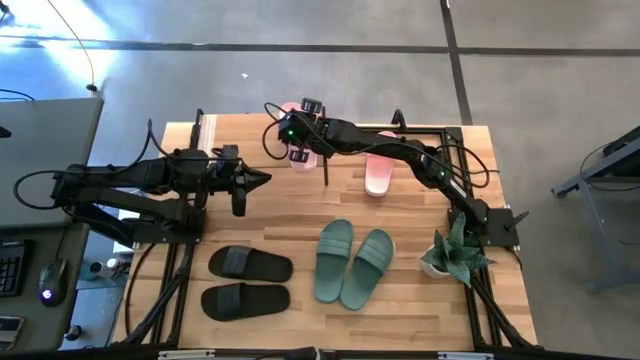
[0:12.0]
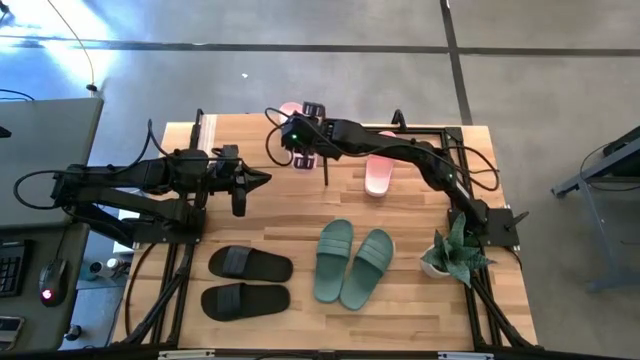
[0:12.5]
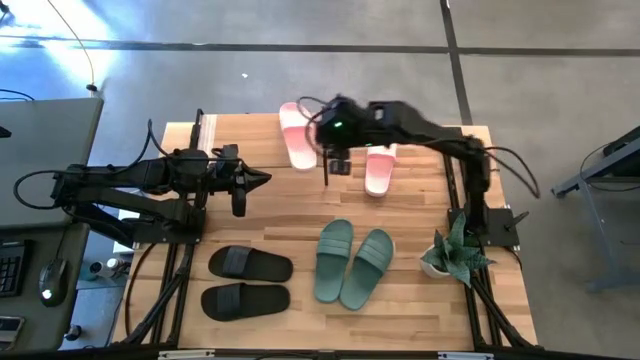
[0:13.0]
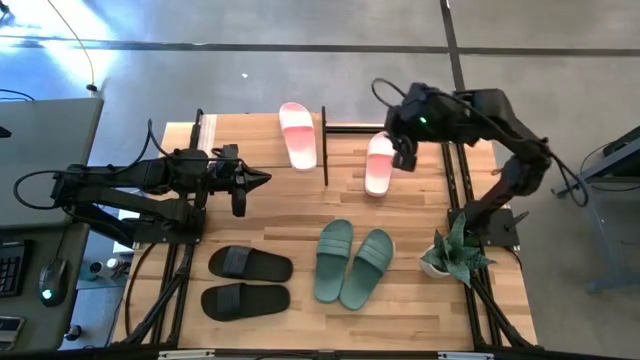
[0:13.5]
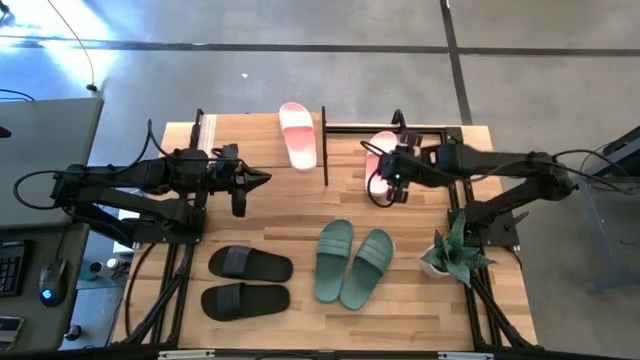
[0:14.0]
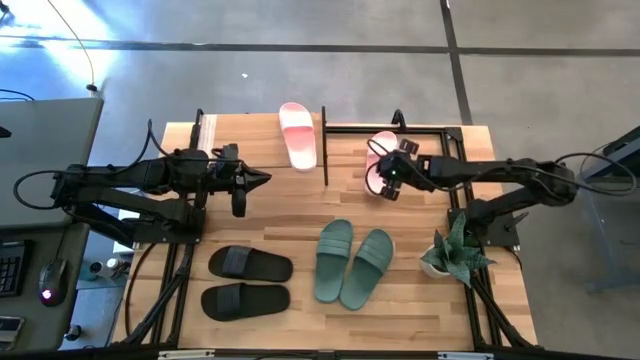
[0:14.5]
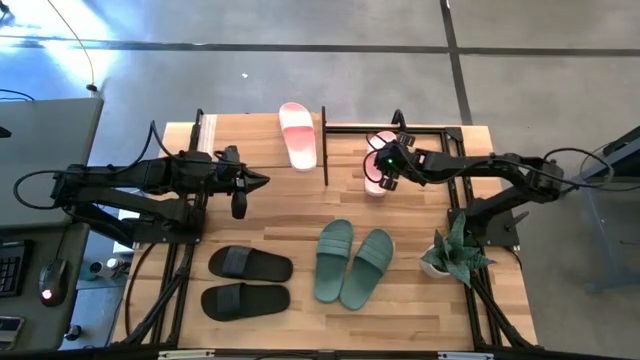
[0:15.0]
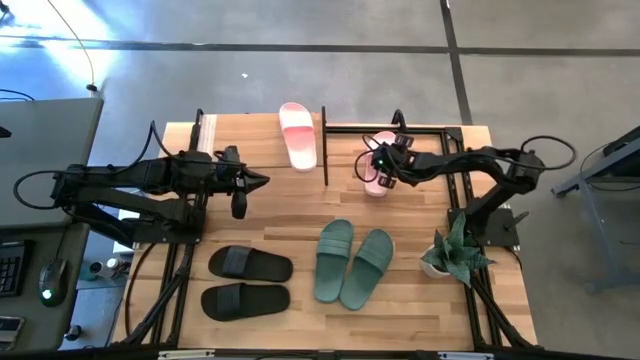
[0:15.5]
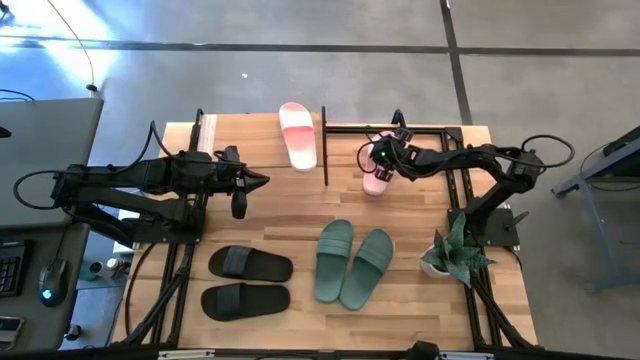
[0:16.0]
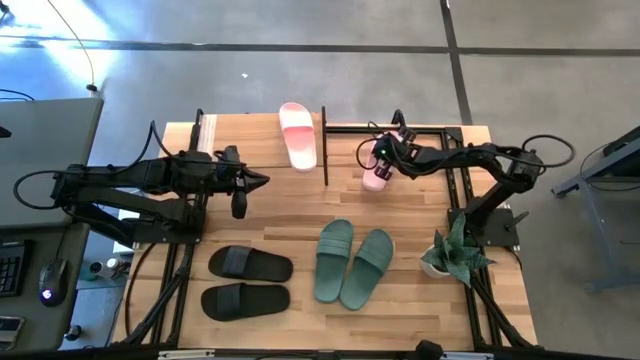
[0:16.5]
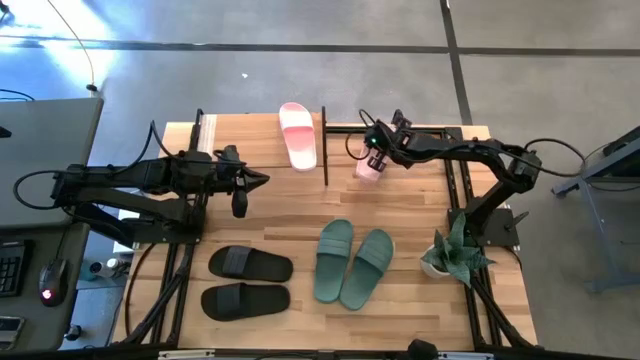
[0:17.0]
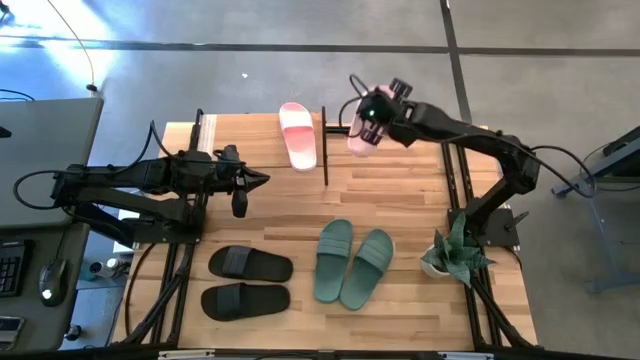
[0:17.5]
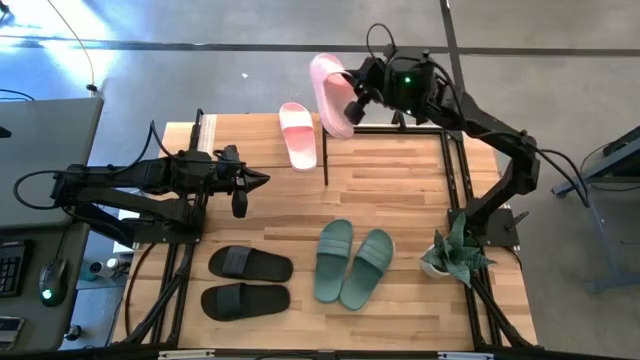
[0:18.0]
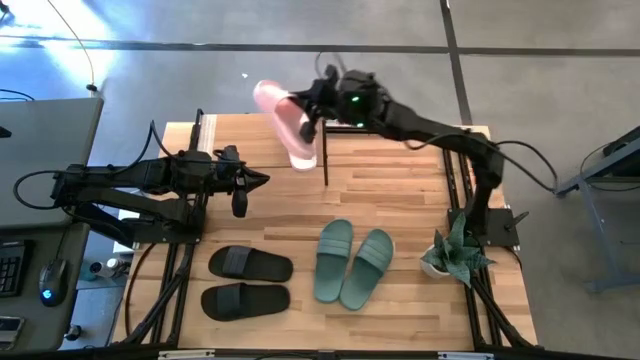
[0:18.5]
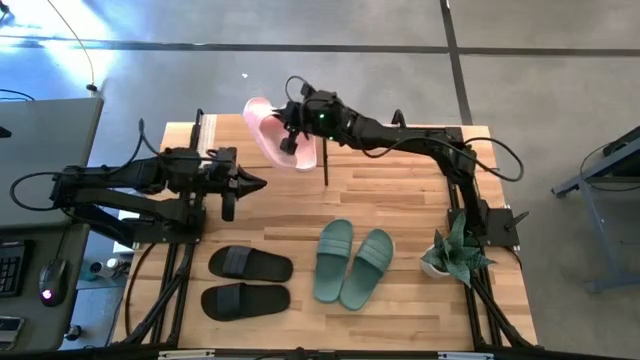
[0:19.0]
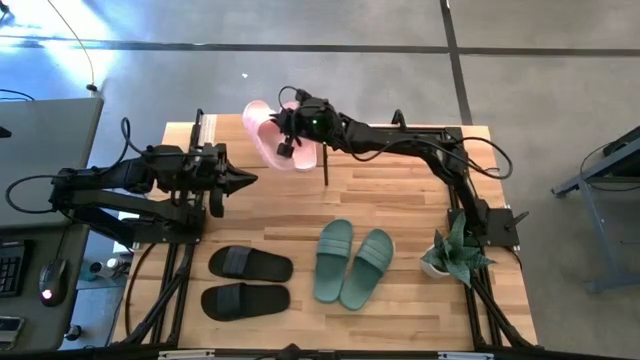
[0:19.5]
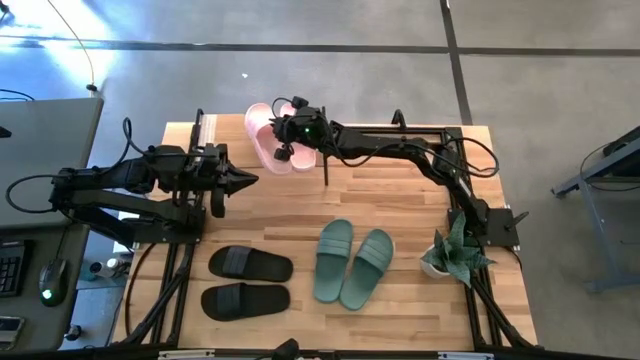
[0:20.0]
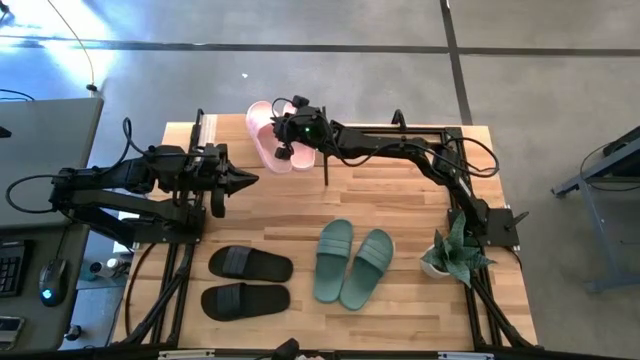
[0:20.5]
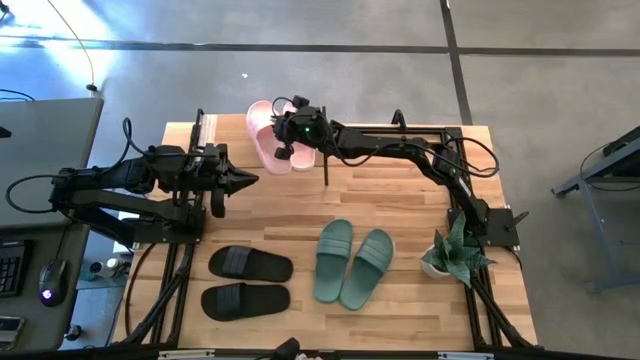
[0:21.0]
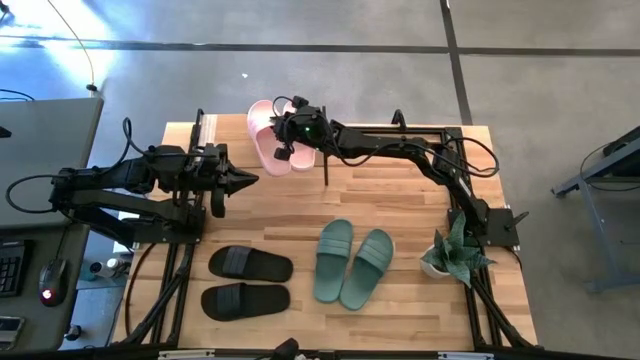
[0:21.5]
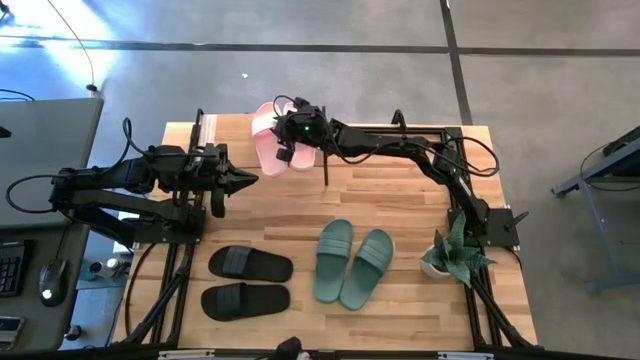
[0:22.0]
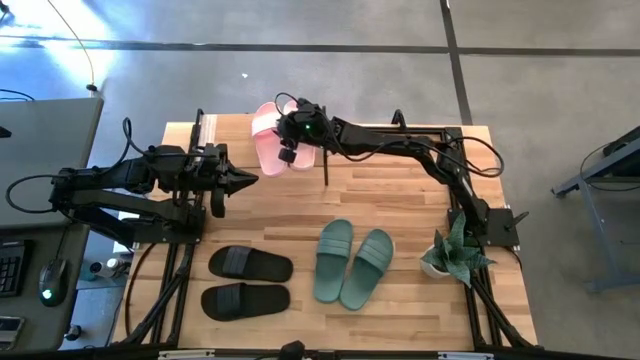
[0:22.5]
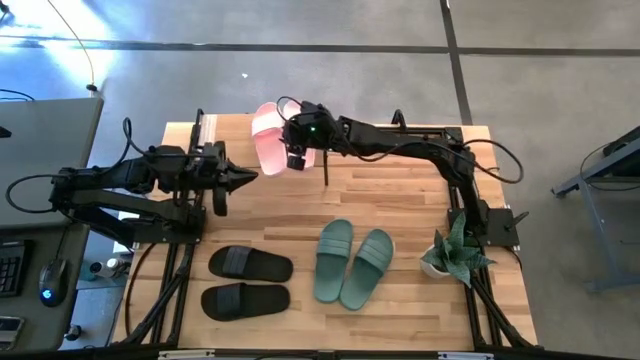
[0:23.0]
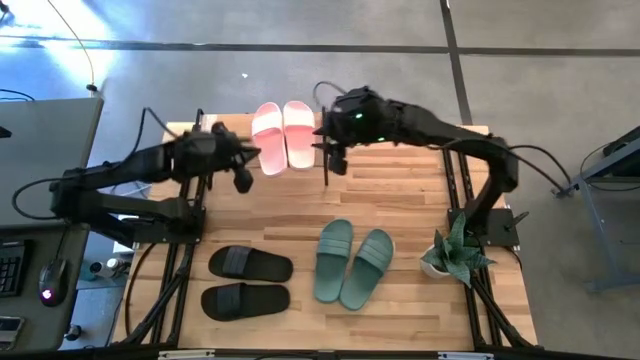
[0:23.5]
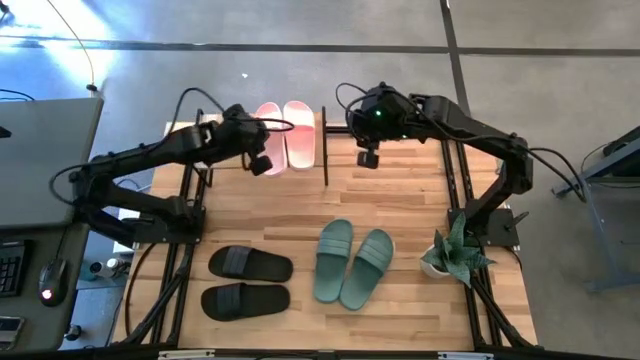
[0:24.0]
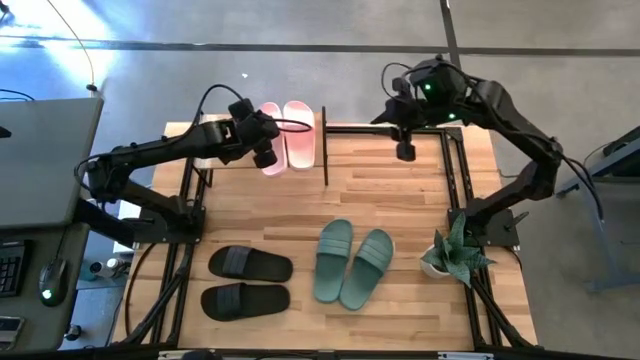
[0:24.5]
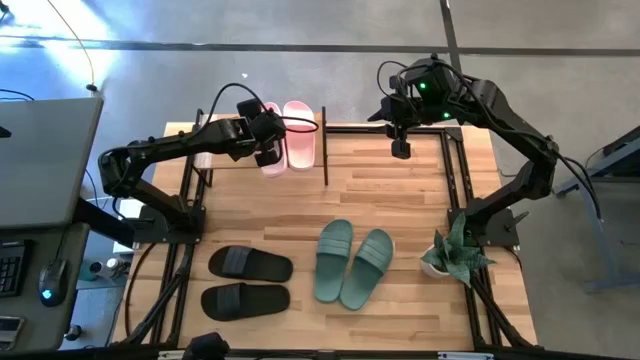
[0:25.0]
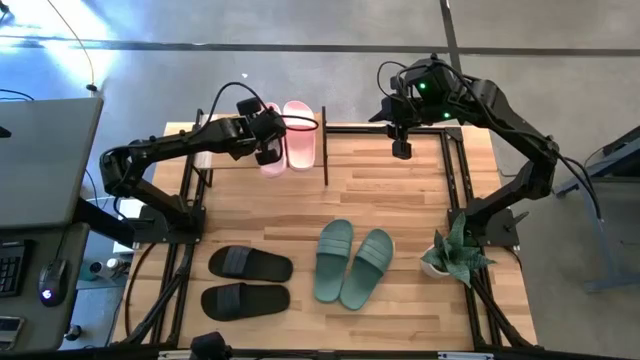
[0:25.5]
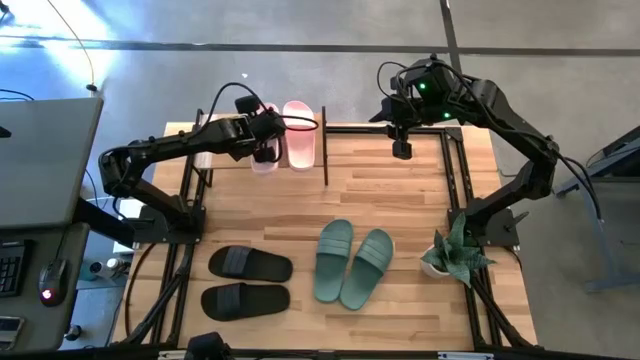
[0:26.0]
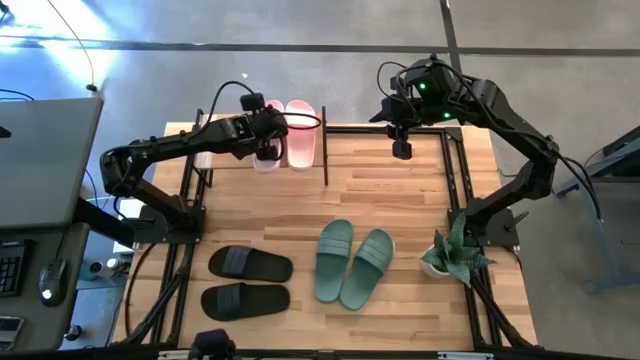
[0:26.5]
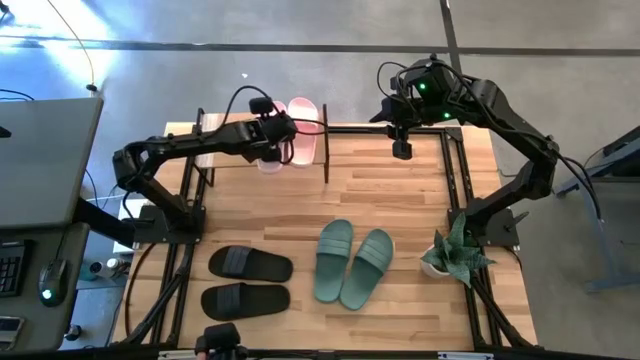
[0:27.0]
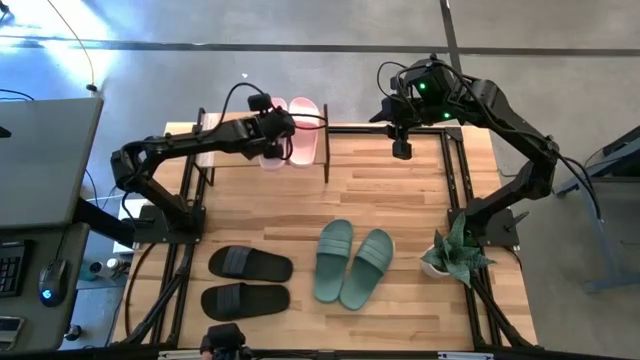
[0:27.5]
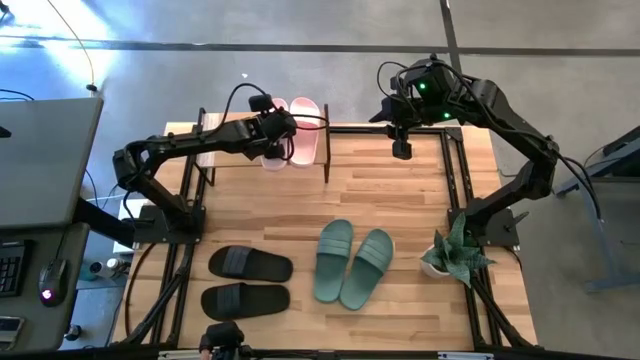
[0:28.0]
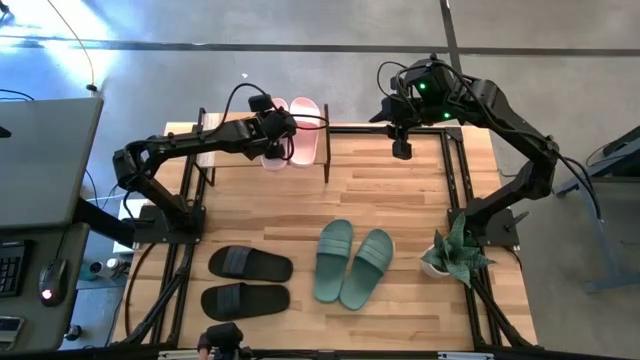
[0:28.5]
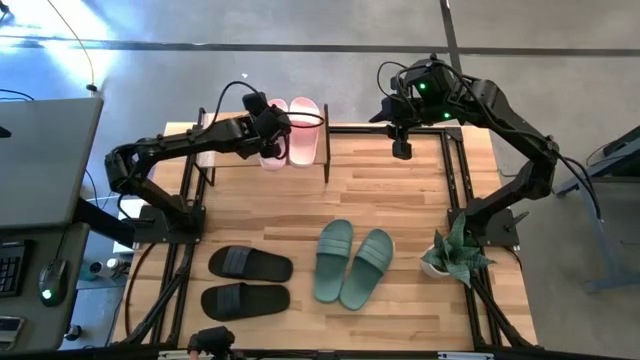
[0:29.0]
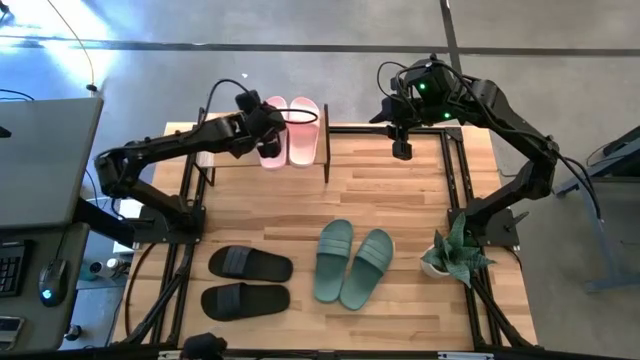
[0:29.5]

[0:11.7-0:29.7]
Task: Pick and place slides into the shelf
Put the pink right slide on the shelf

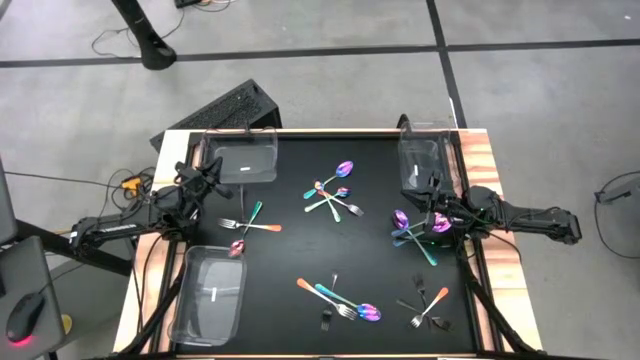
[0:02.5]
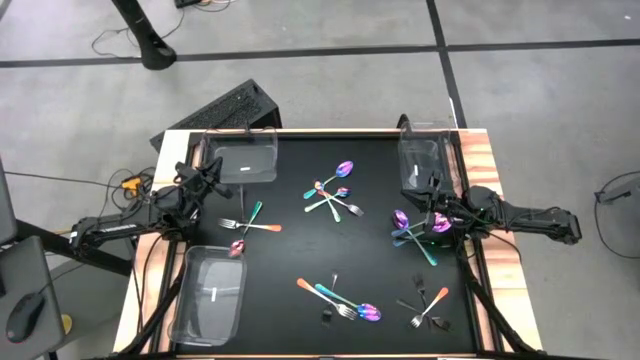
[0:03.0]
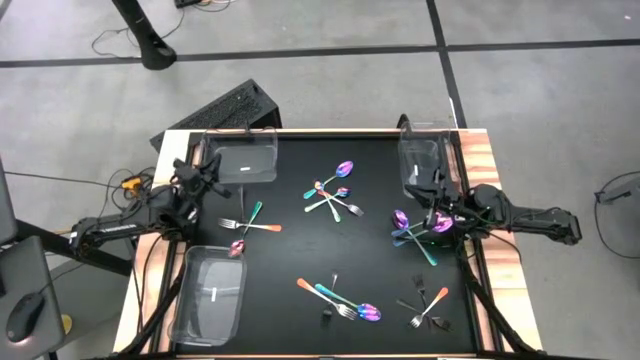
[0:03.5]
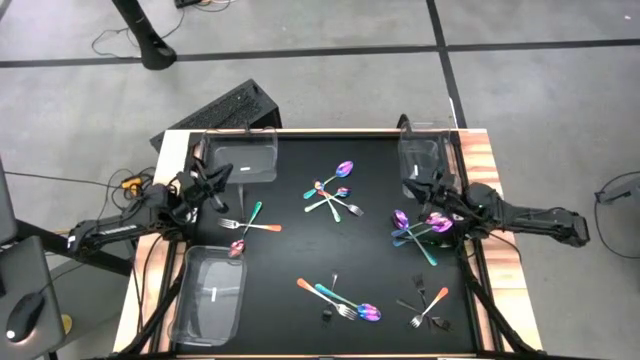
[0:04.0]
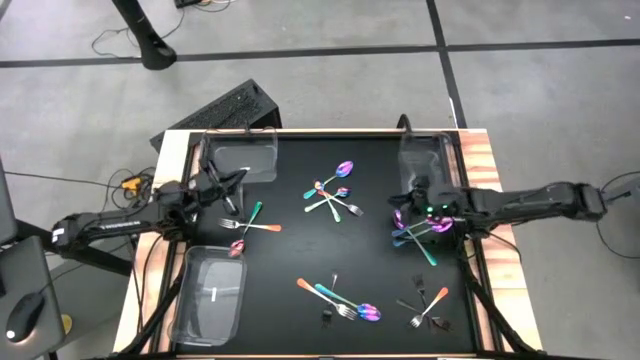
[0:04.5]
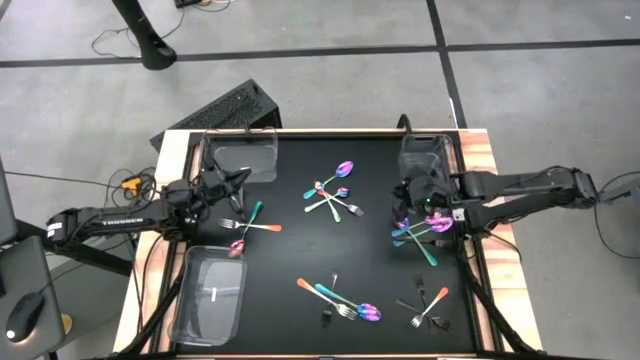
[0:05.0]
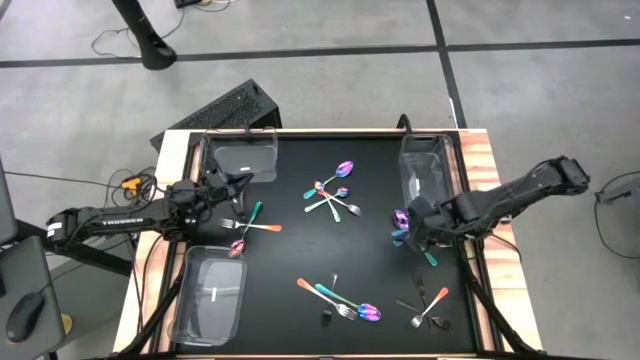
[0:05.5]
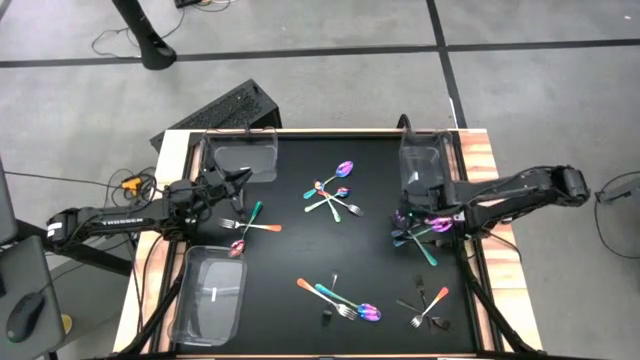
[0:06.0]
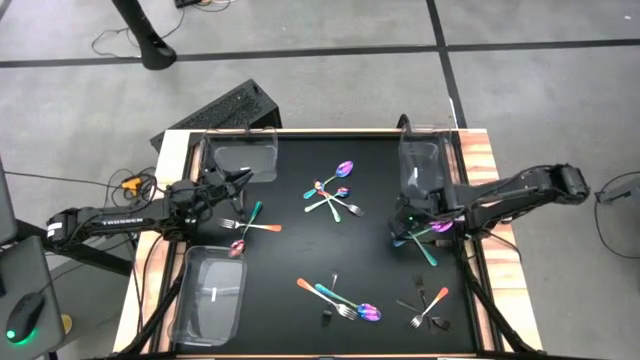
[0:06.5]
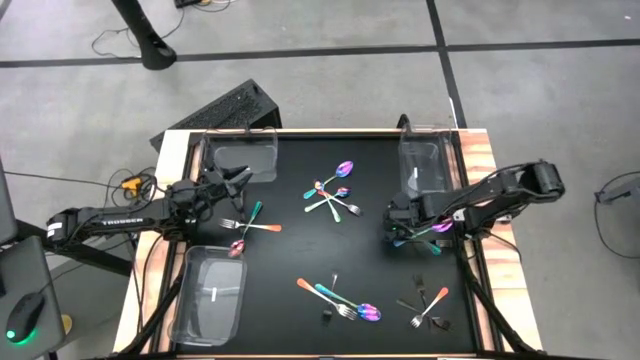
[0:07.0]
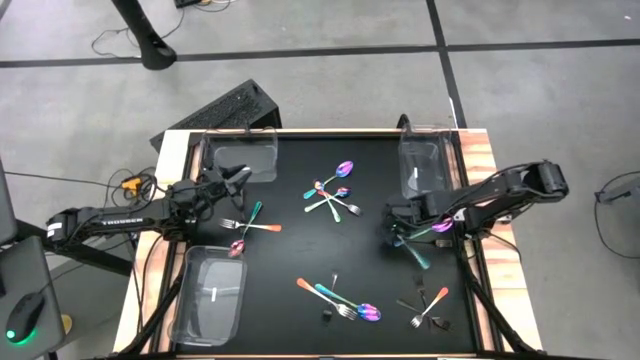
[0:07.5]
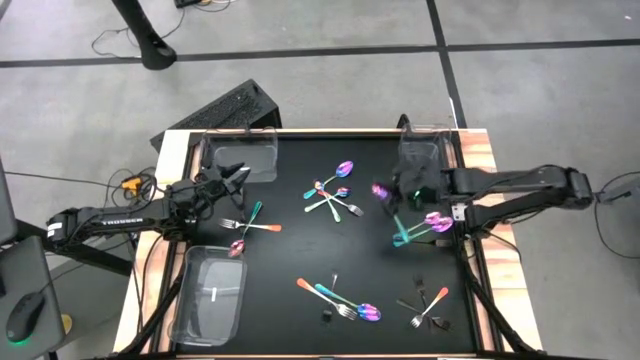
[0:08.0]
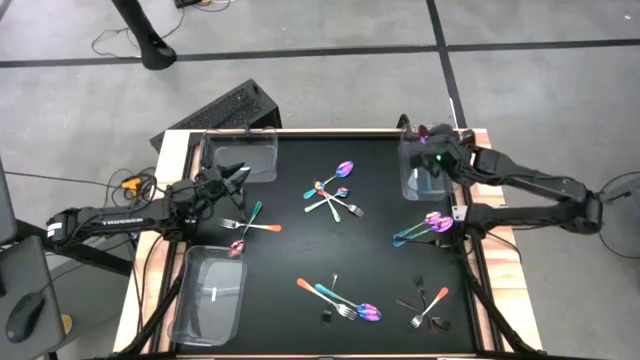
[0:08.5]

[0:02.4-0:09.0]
Task: Sort silverware by color (type)
Put the violet spoon into the top right transparent bin
